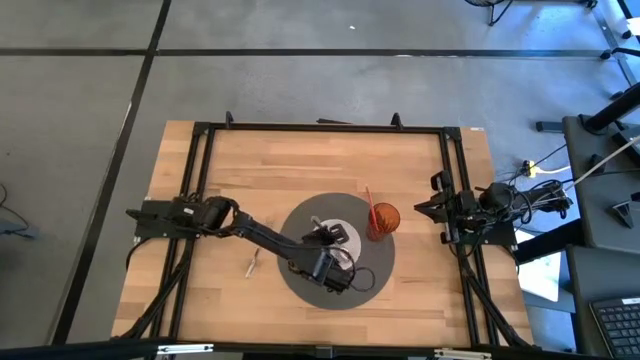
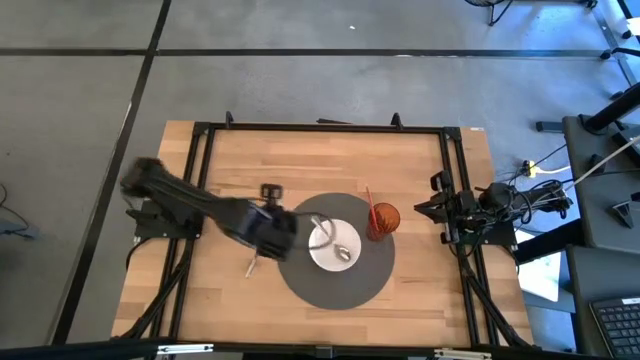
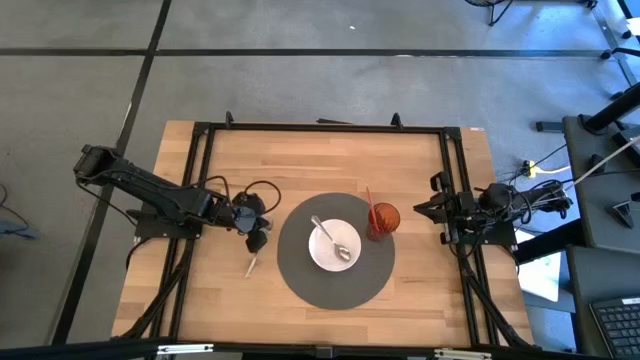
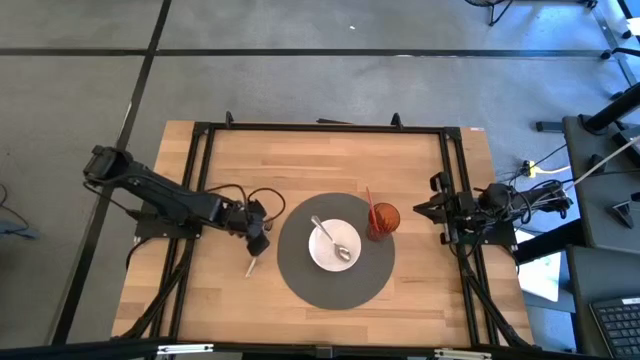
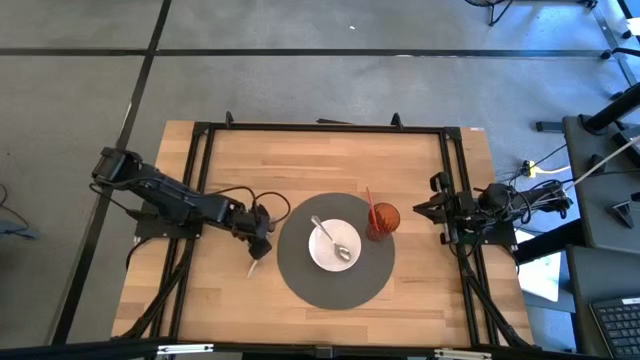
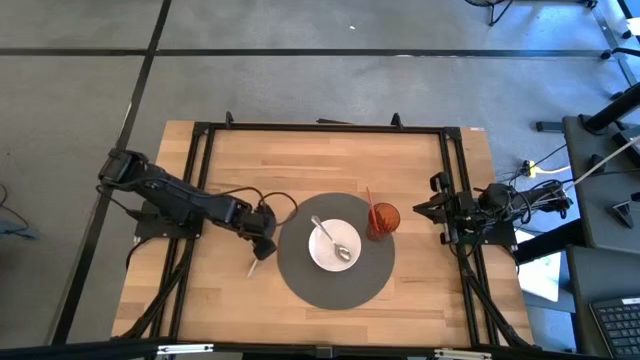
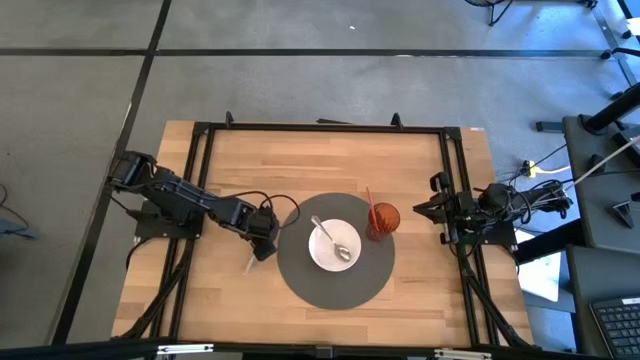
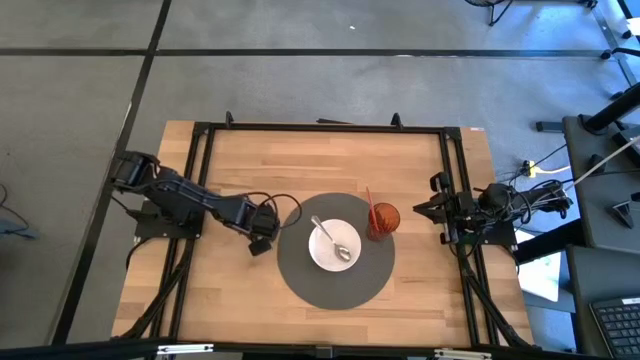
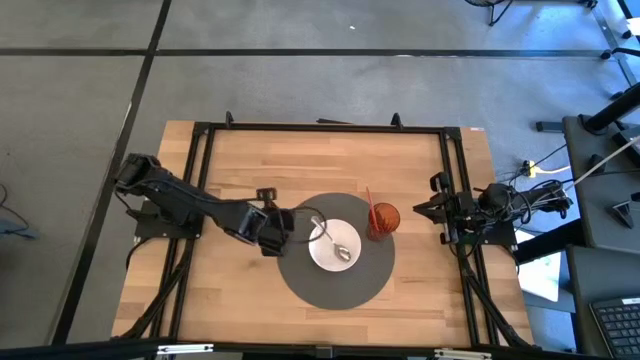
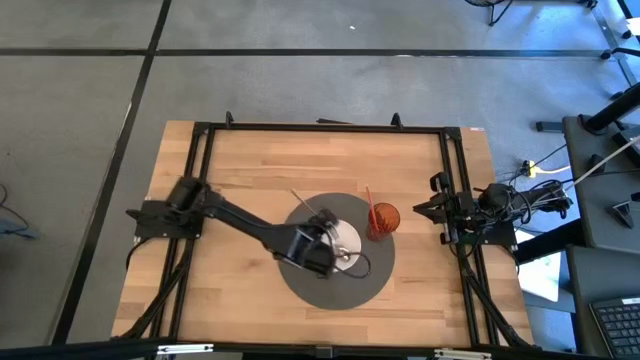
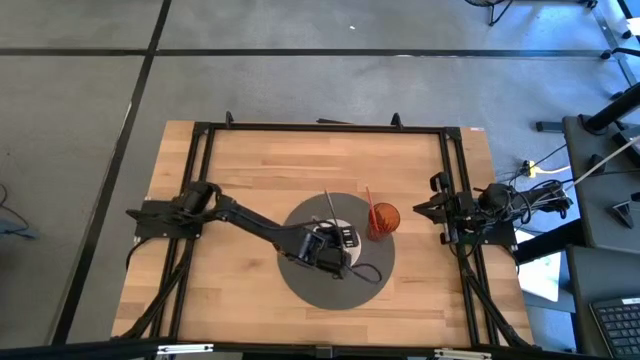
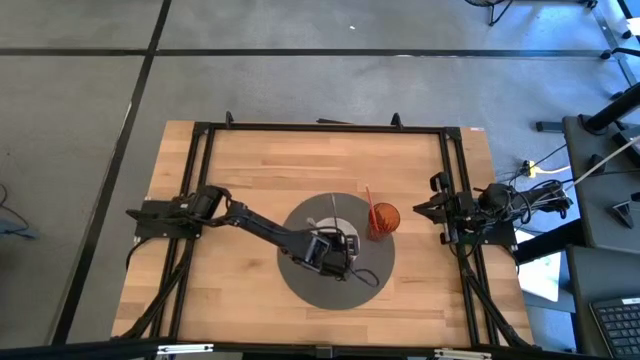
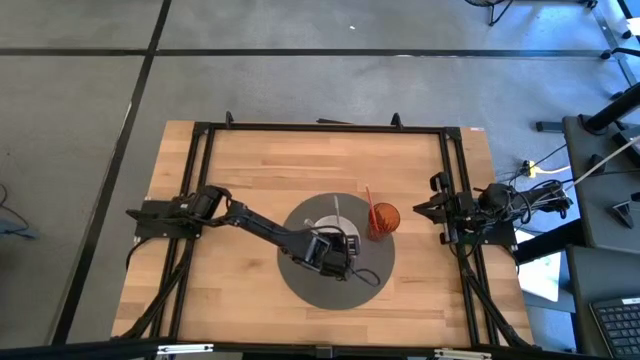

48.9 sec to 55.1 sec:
Task: Pick & Place Utensil
Put the silver fork into the white bowl

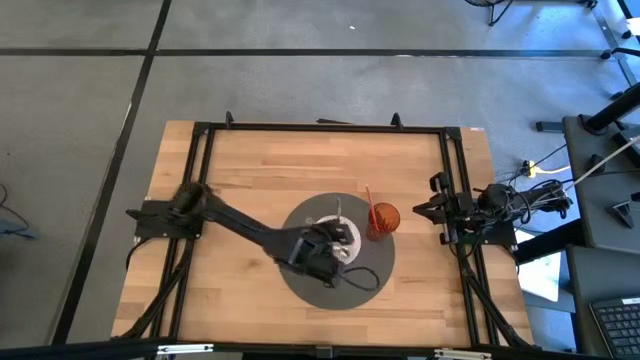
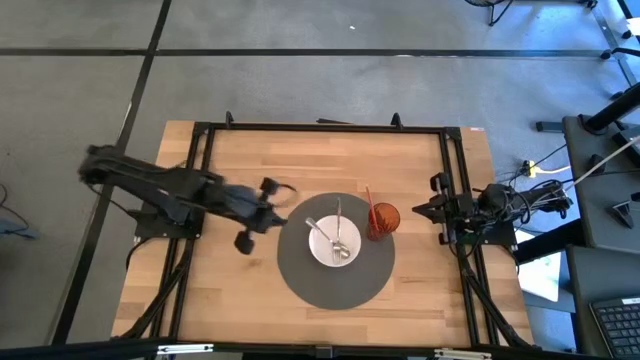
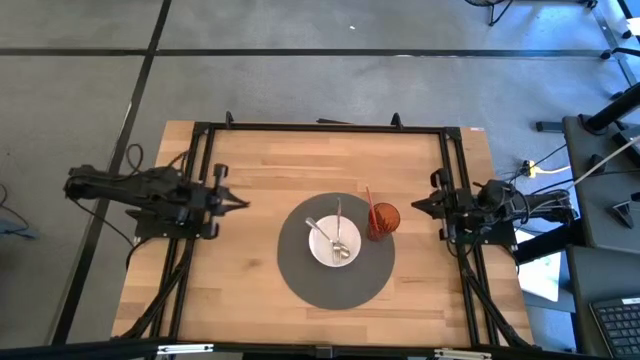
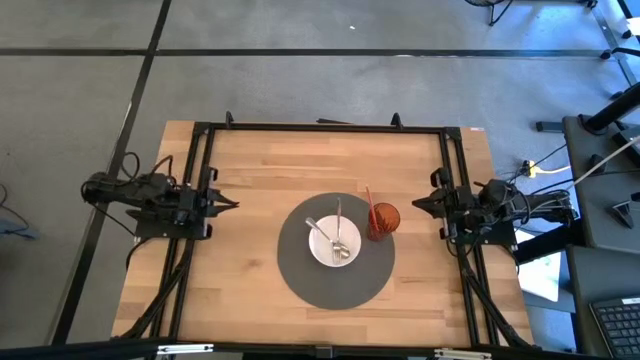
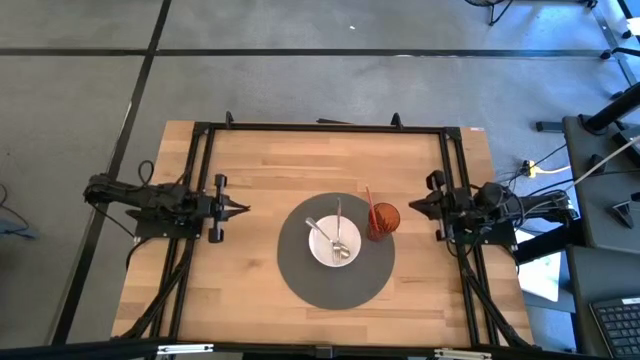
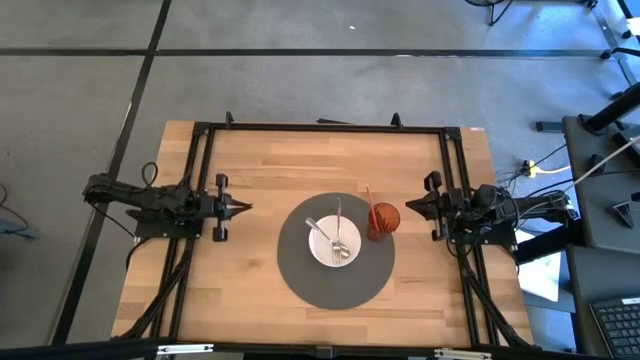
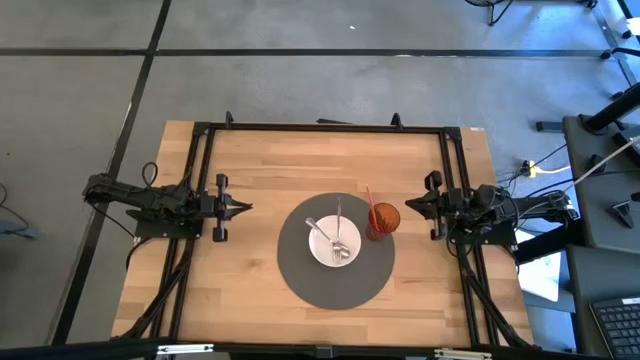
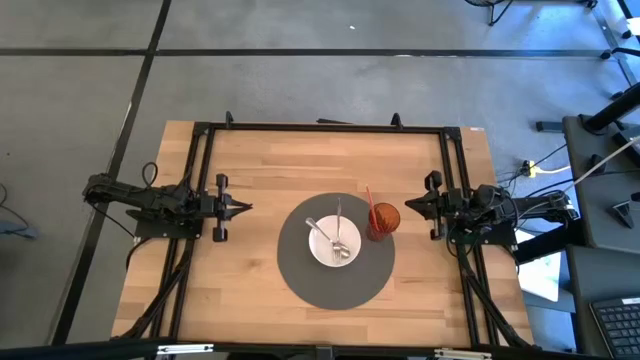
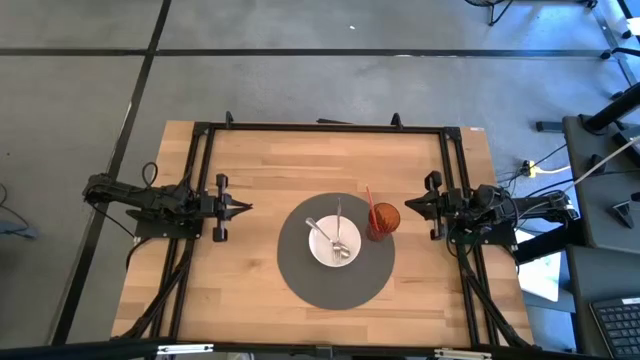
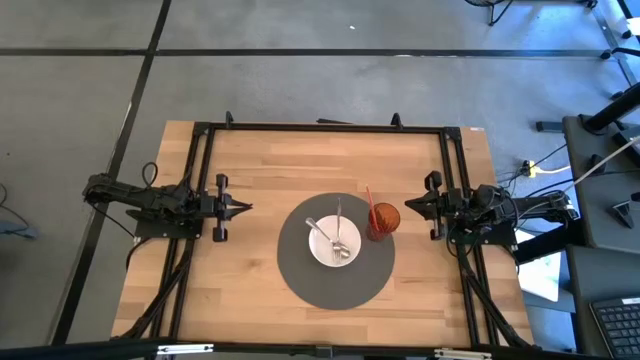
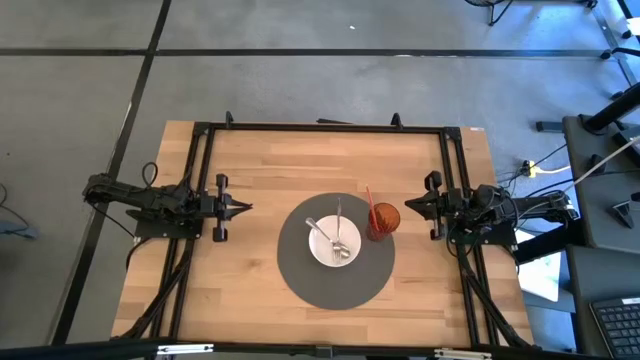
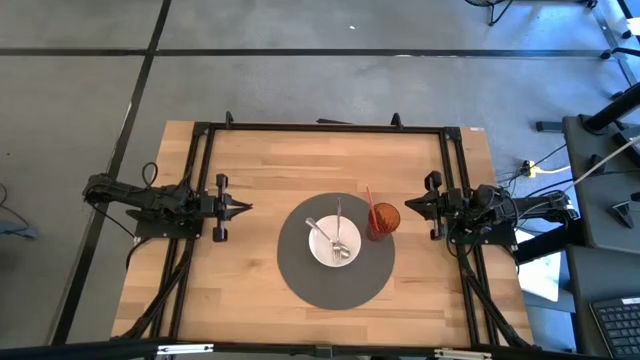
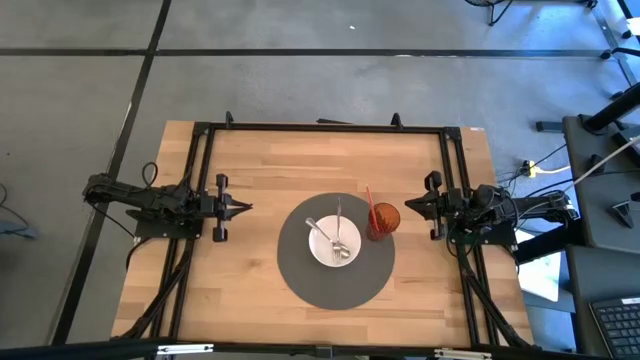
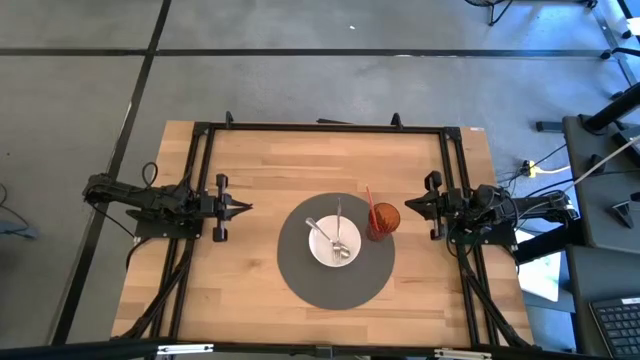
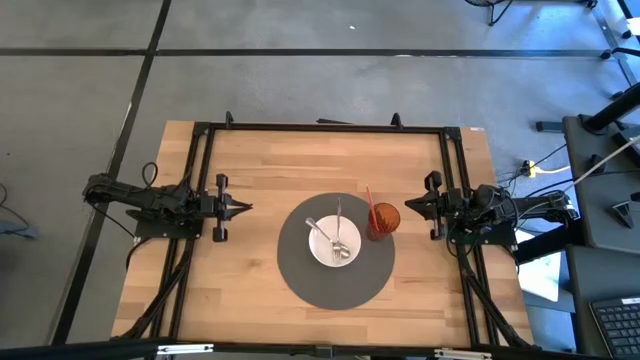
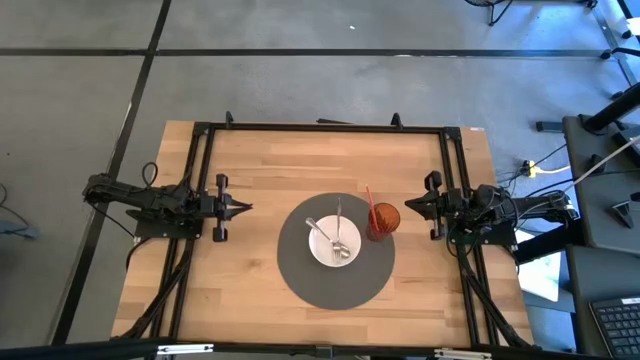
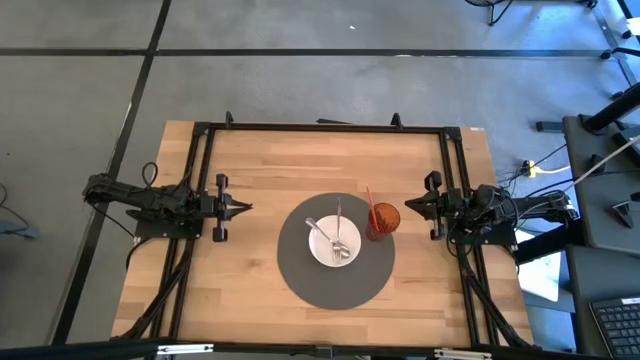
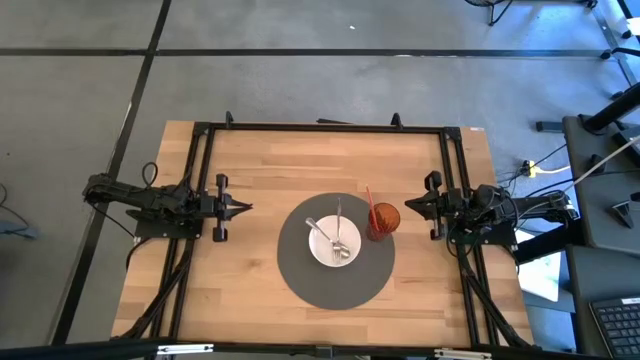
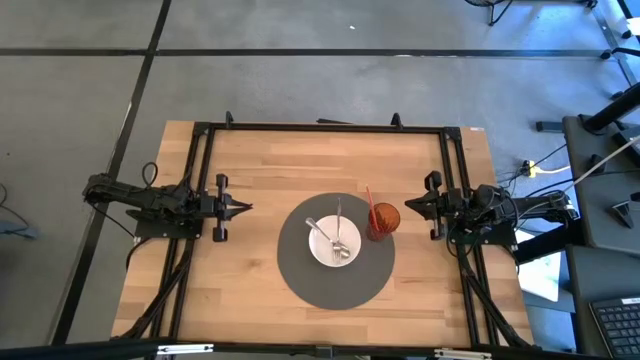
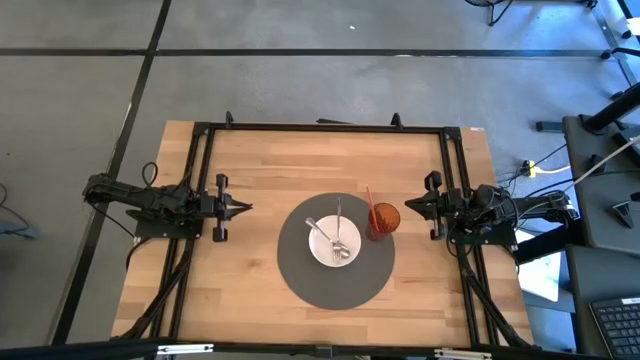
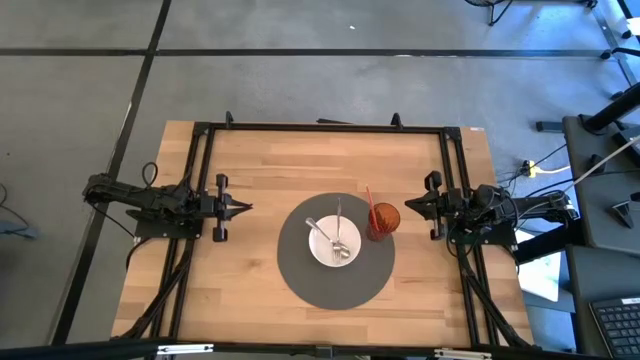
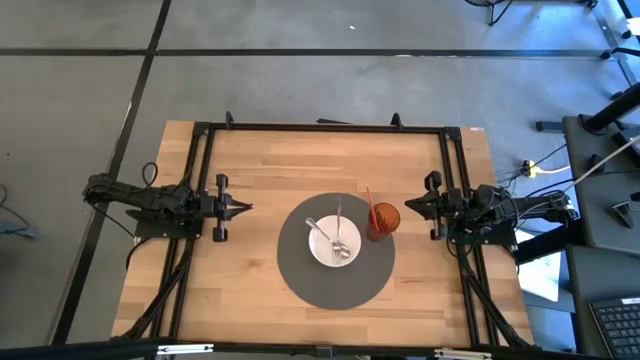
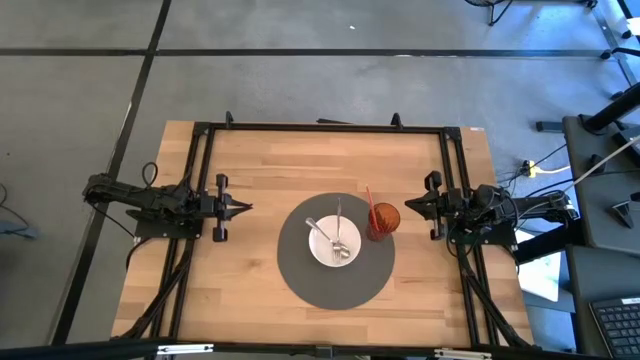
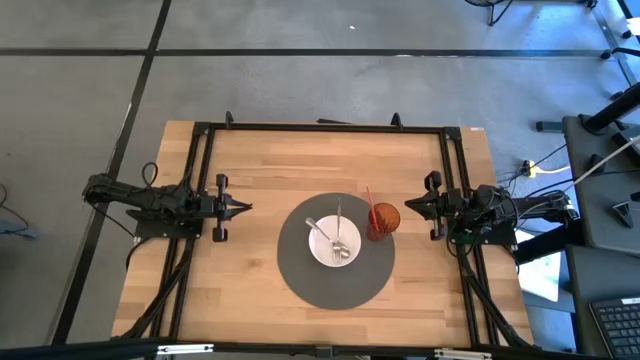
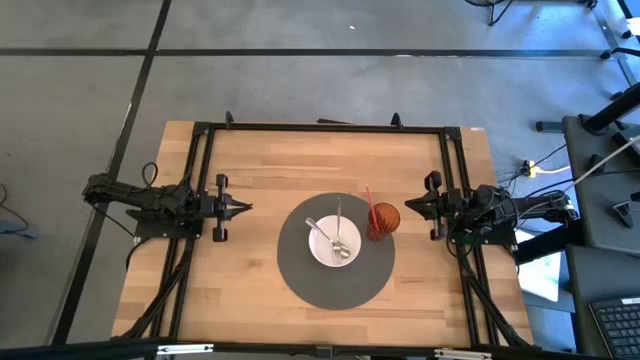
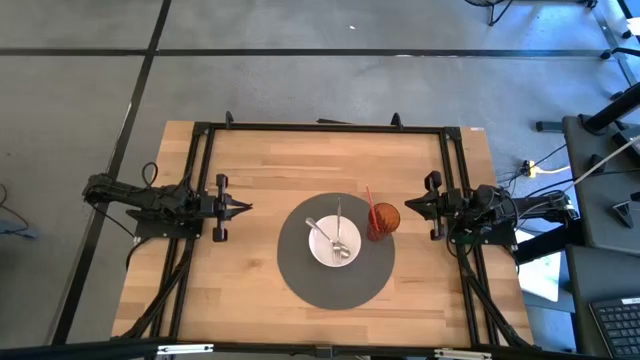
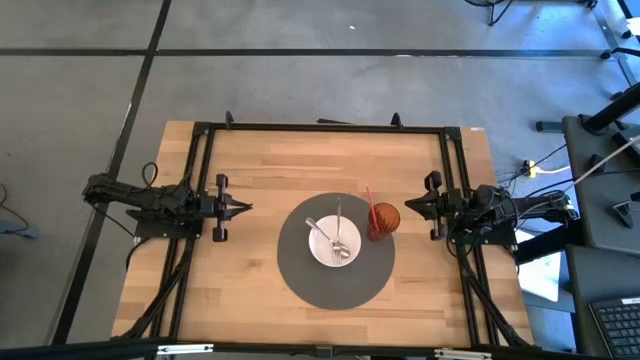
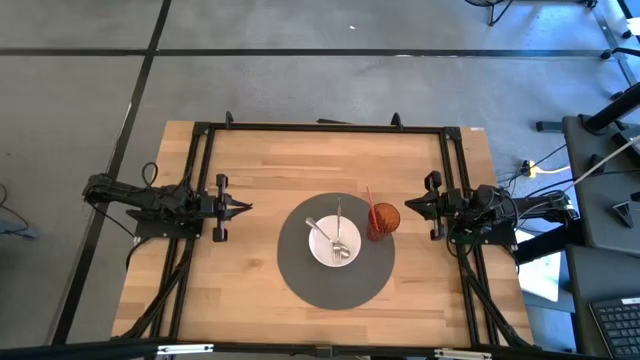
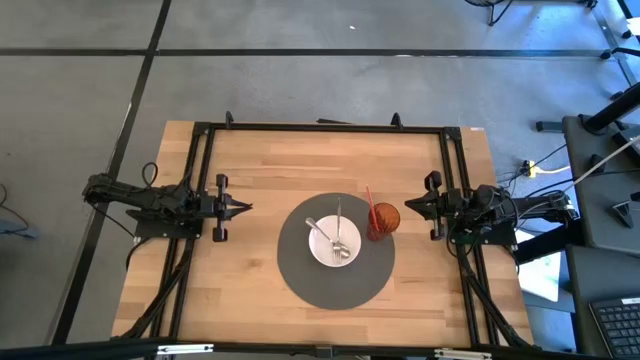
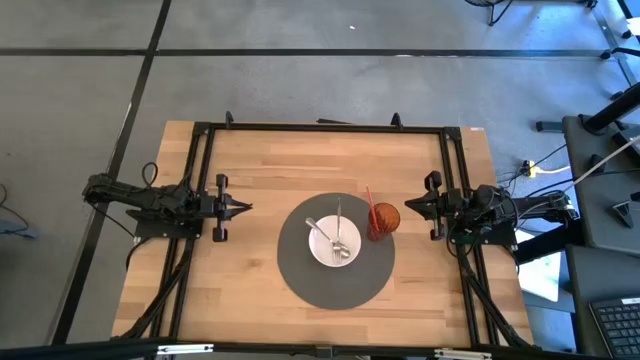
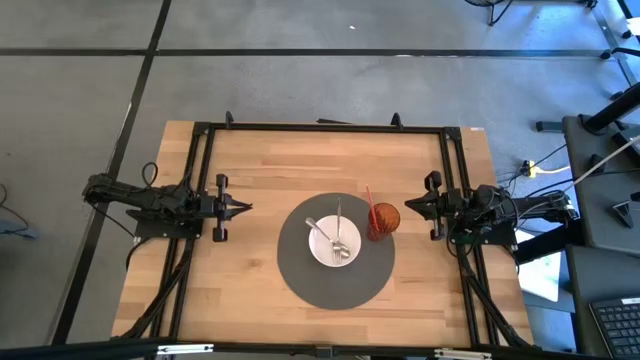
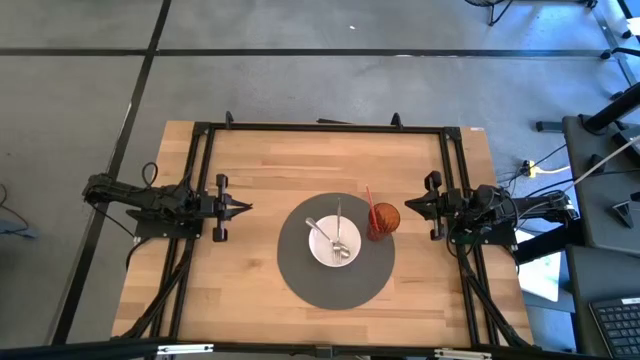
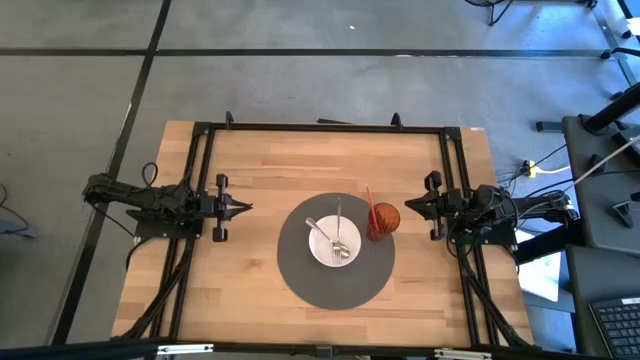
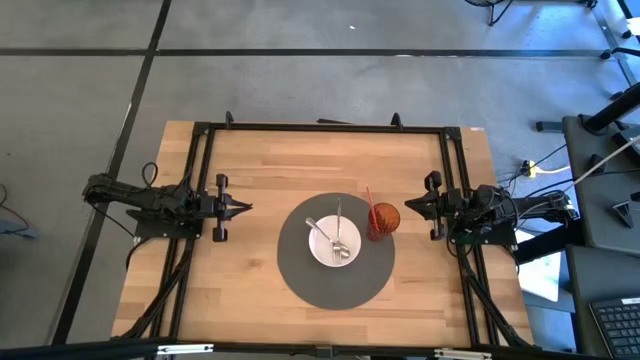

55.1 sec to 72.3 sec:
Return to Home Position
